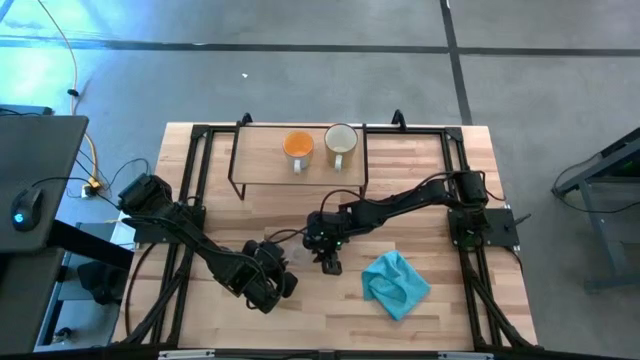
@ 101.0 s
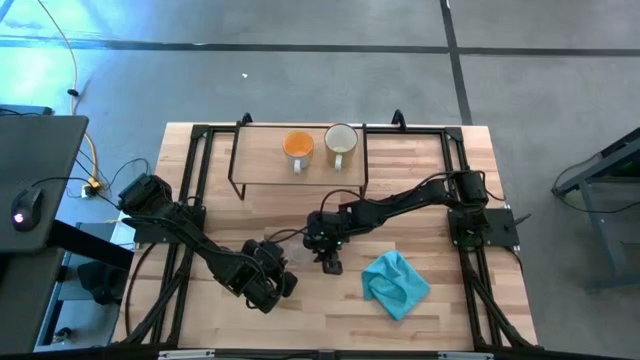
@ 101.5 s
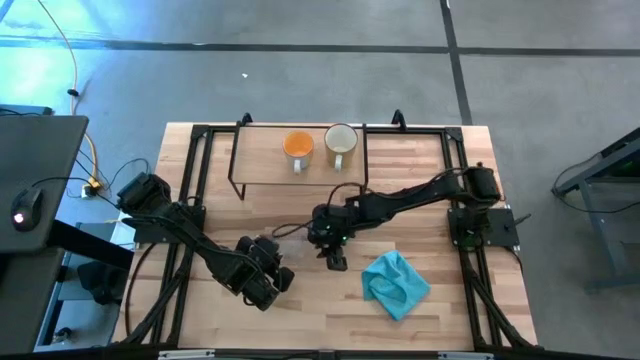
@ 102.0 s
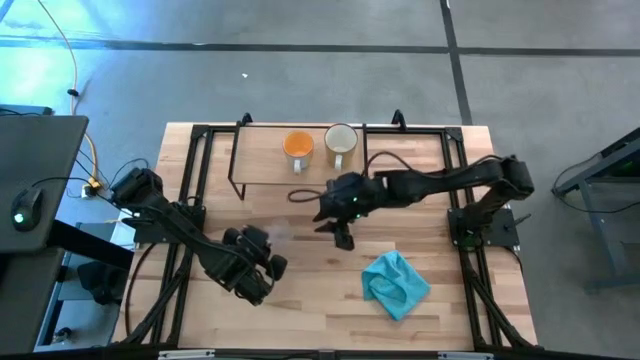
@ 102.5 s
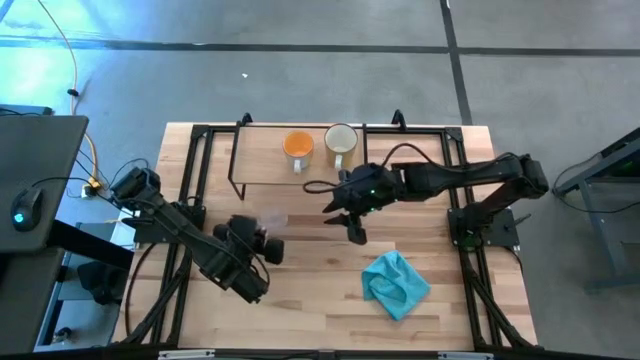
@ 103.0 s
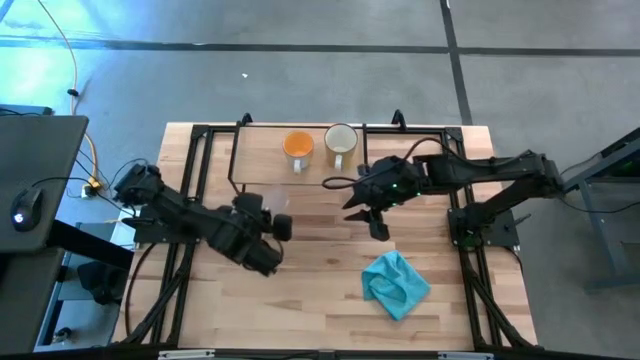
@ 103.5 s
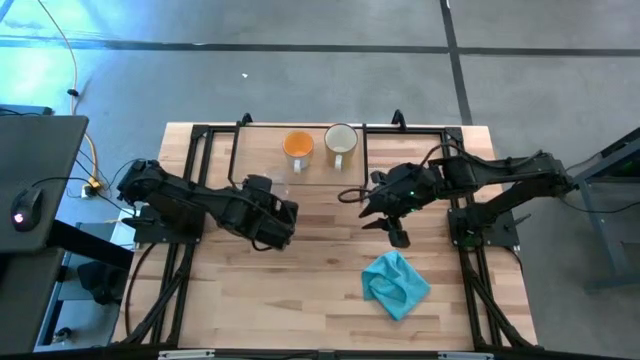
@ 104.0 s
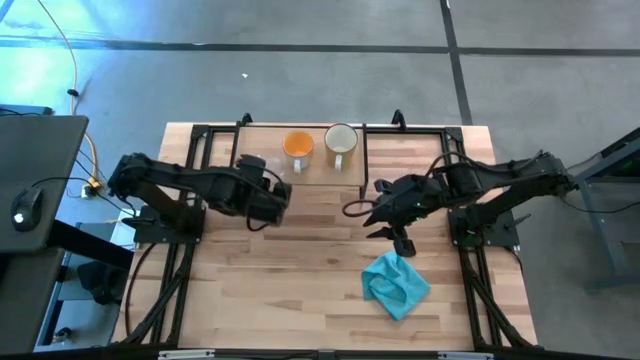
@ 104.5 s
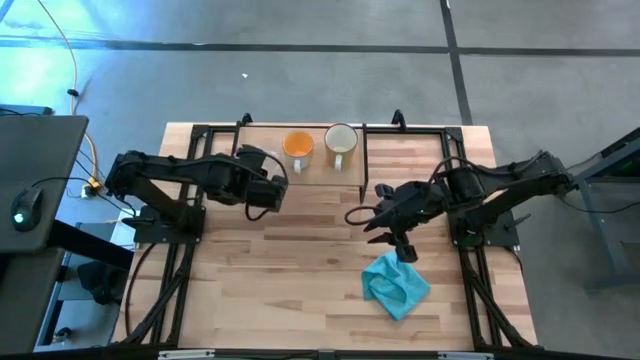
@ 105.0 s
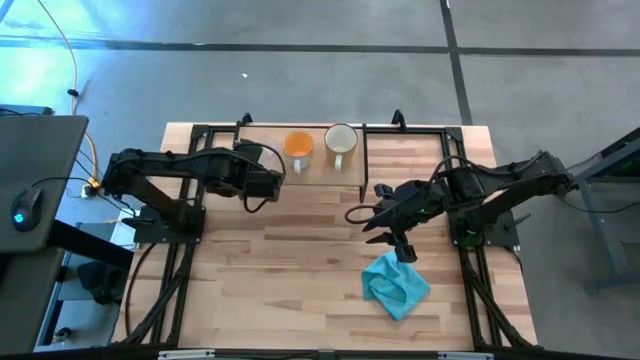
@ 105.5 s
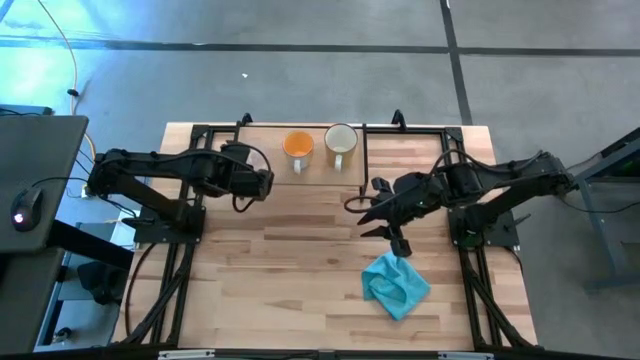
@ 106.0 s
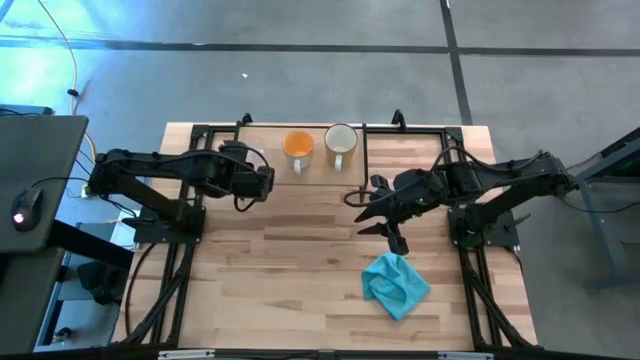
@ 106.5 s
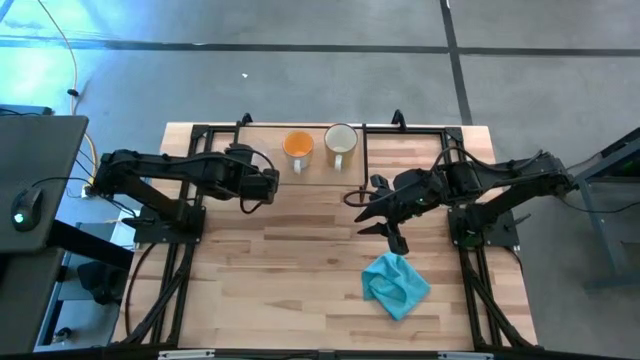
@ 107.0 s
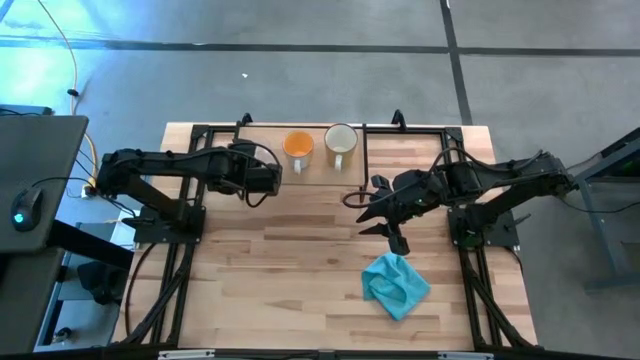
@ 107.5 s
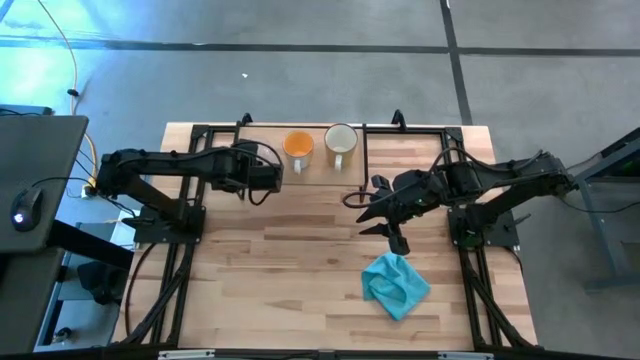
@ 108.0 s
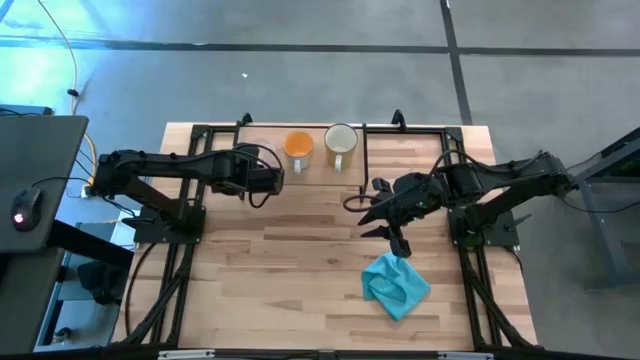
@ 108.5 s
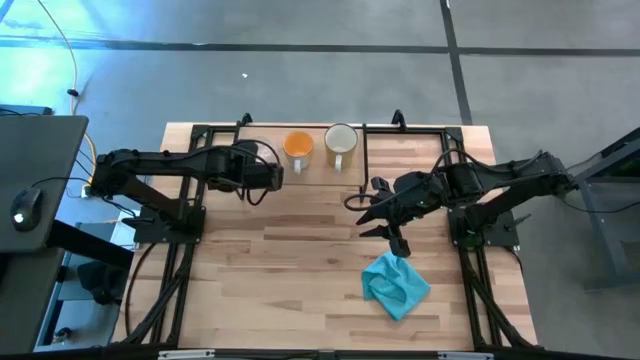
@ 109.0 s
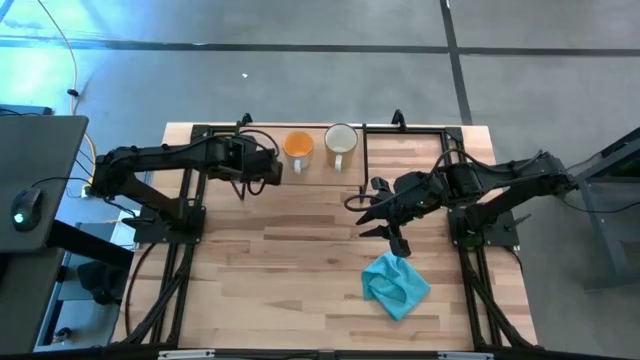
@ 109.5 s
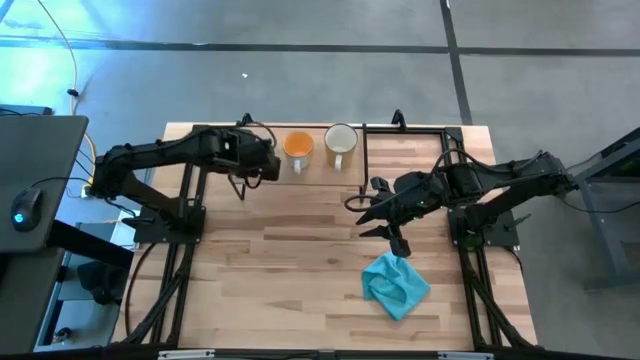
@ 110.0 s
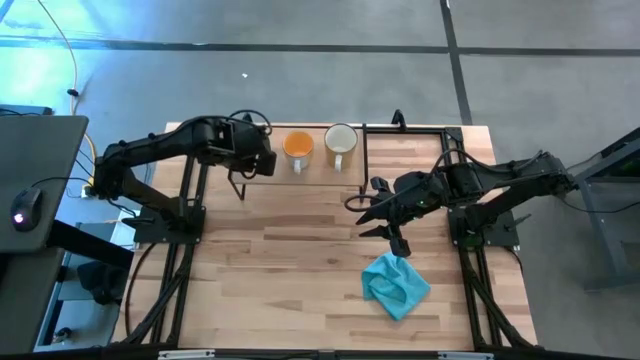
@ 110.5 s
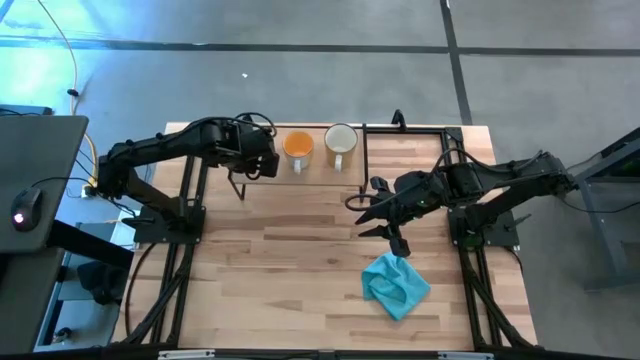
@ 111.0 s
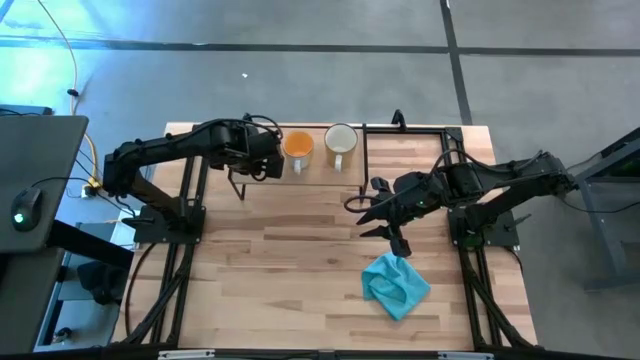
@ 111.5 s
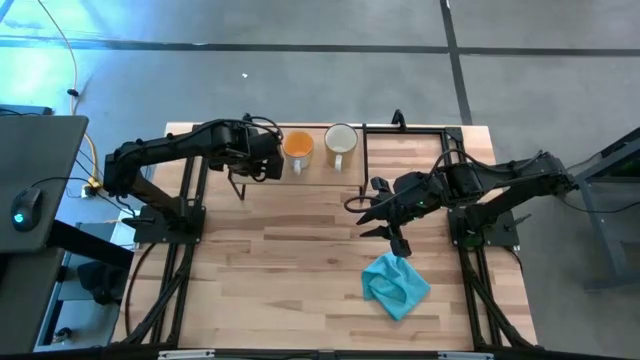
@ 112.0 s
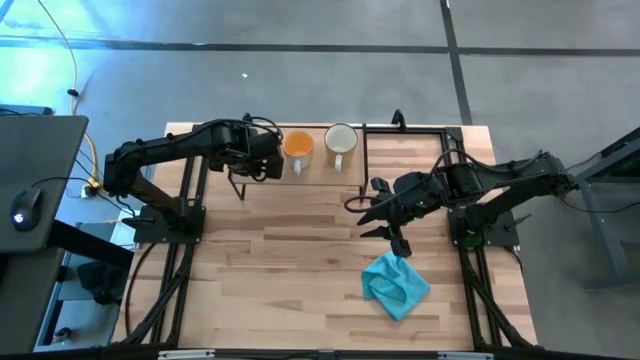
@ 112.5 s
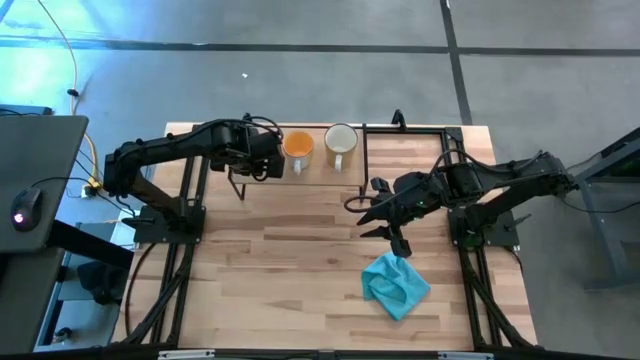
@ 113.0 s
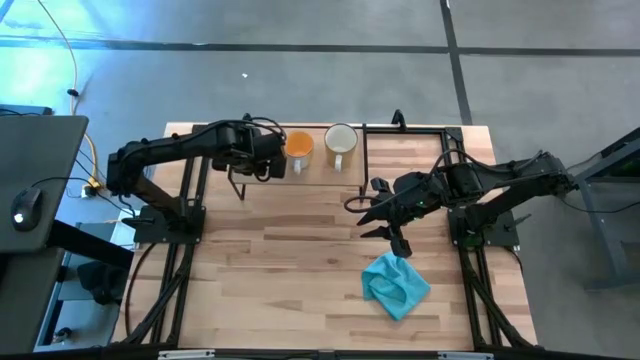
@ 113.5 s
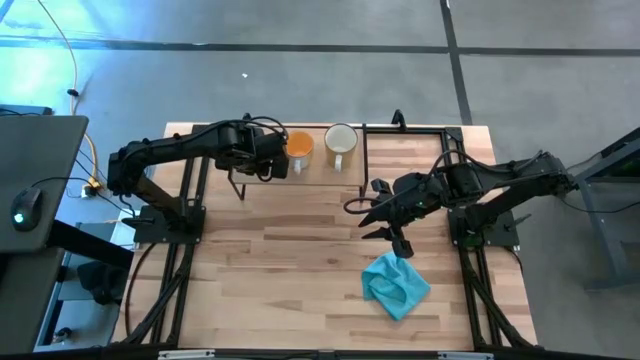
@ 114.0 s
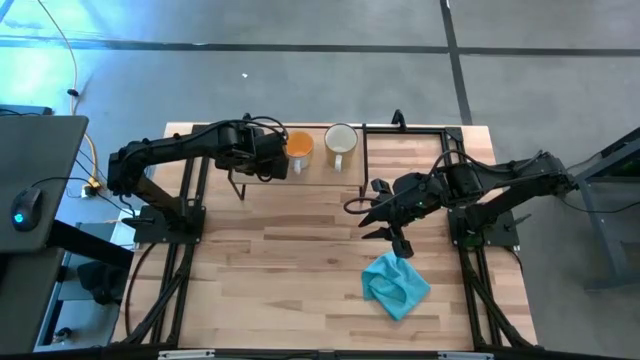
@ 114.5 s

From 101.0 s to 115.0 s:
Task: Stack small to large cups/mugs on shelf
Put the transparent mug on the shelf

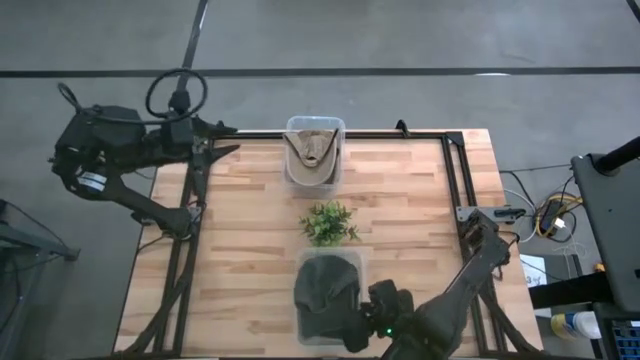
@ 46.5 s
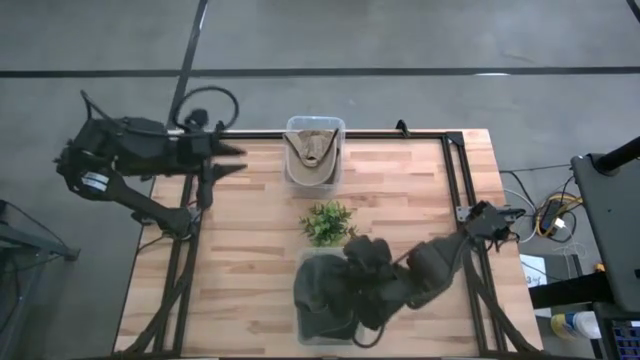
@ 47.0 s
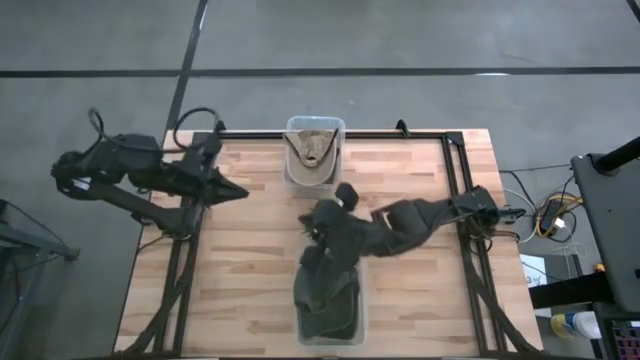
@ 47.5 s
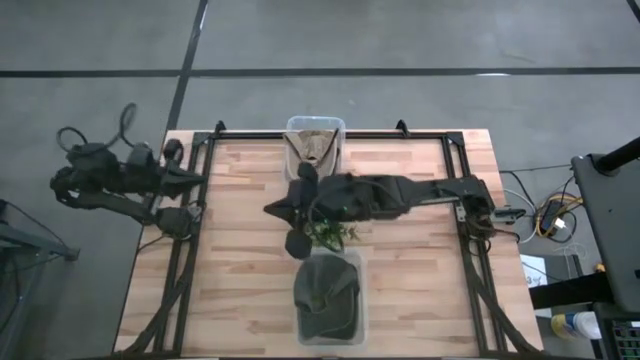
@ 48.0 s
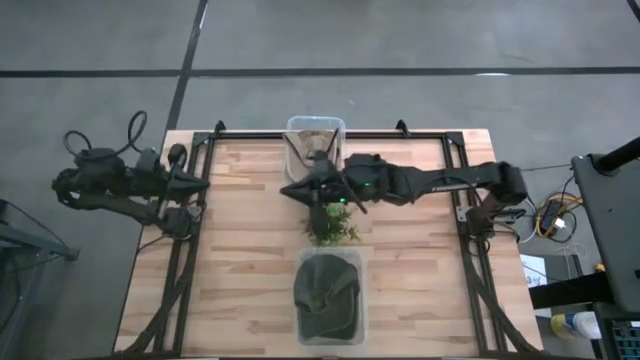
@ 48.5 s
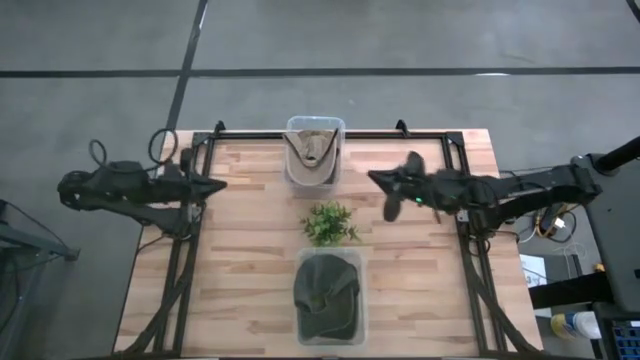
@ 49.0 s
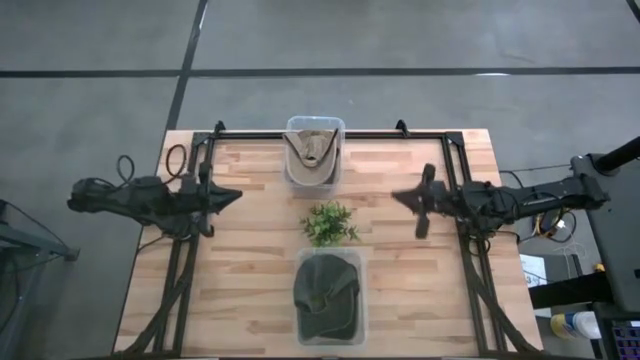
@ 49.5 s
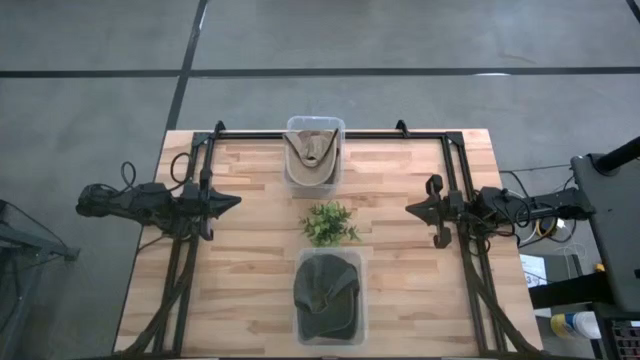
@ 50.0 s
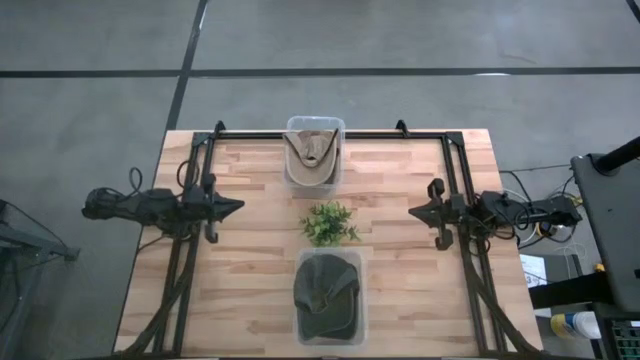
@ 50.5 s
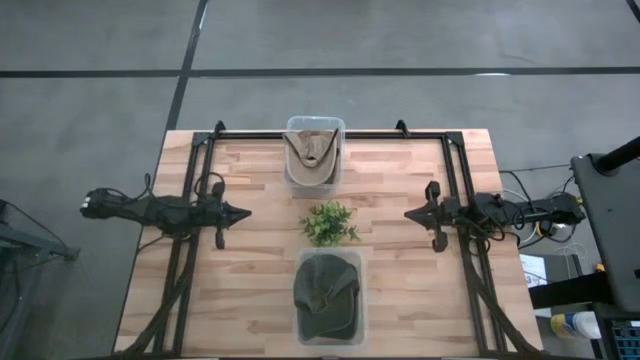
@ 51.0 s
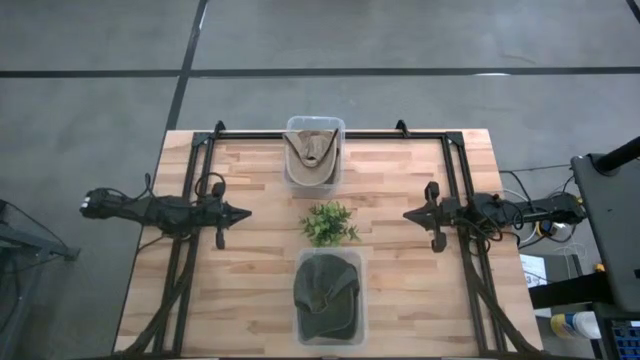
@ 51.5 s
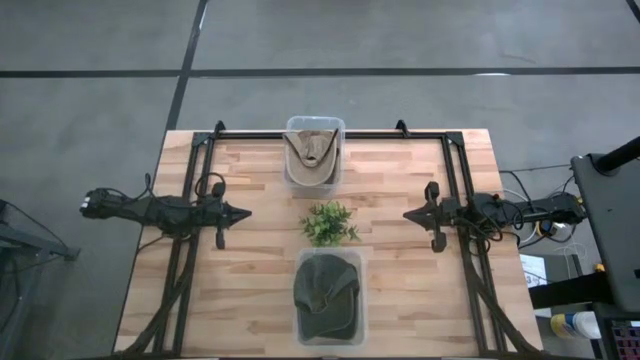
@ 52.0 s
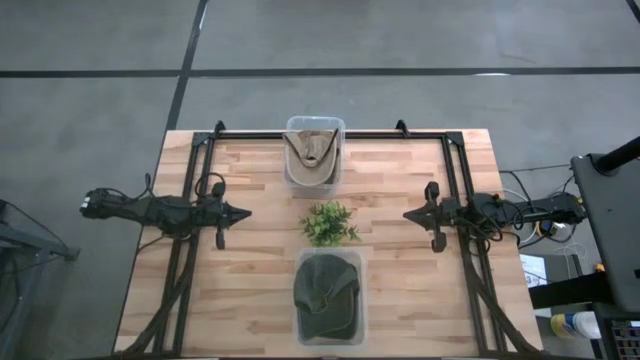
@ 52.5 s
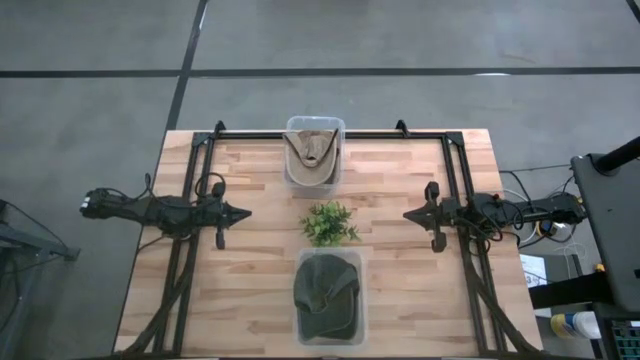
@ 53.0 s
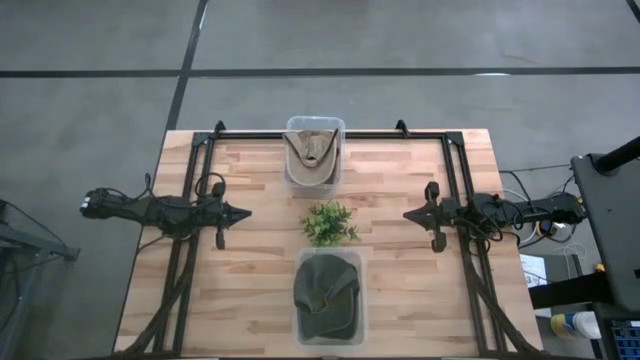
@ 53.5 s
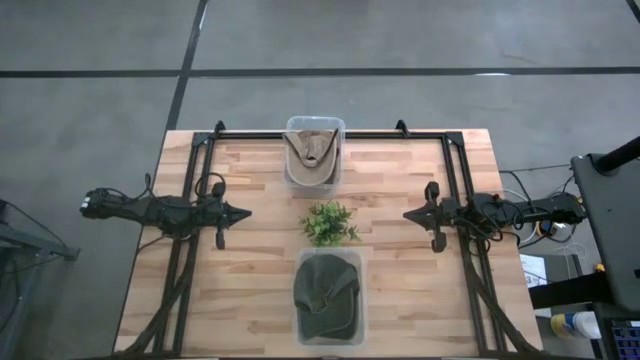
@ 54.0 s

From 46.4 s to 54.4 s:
Task: Pick & Place hat
Return to Home Position
